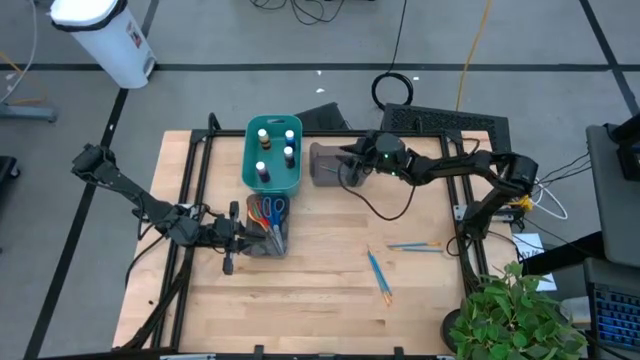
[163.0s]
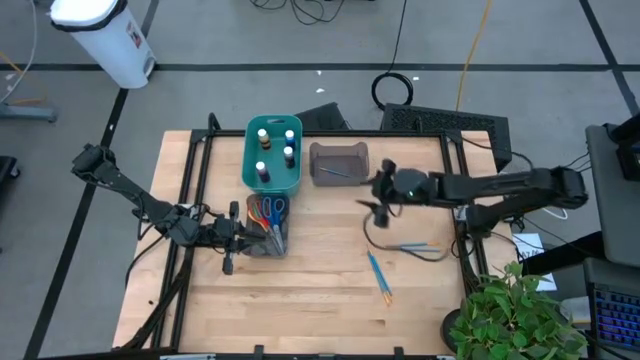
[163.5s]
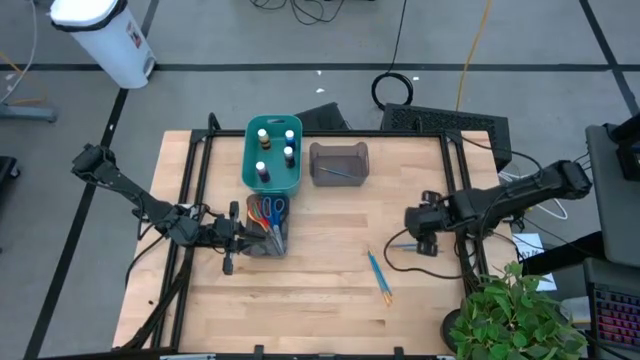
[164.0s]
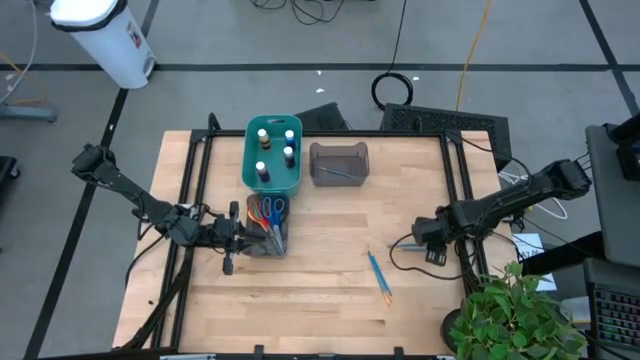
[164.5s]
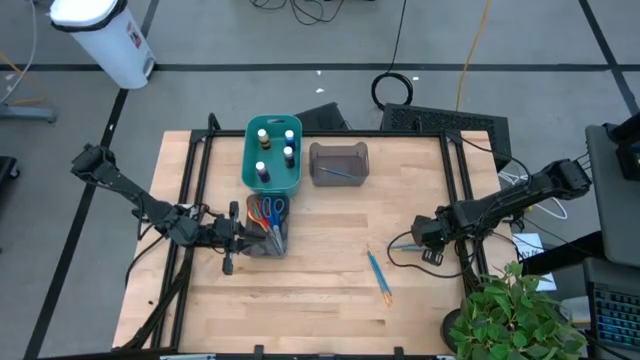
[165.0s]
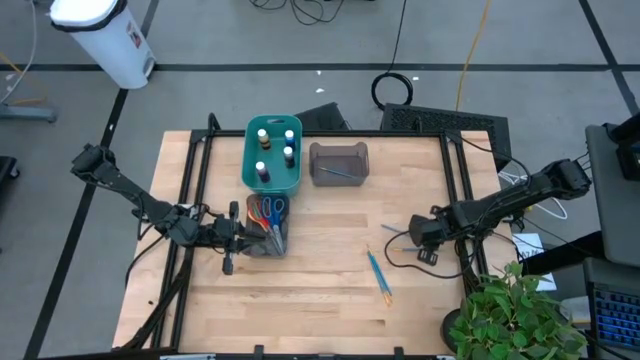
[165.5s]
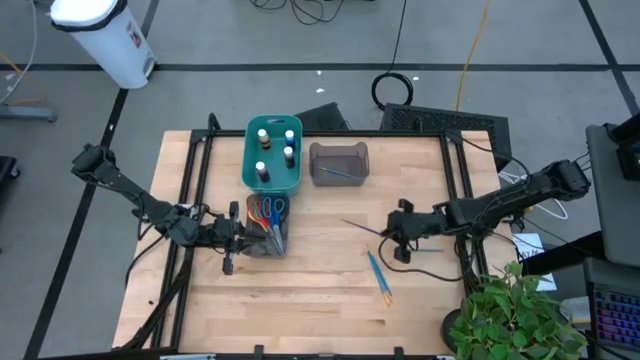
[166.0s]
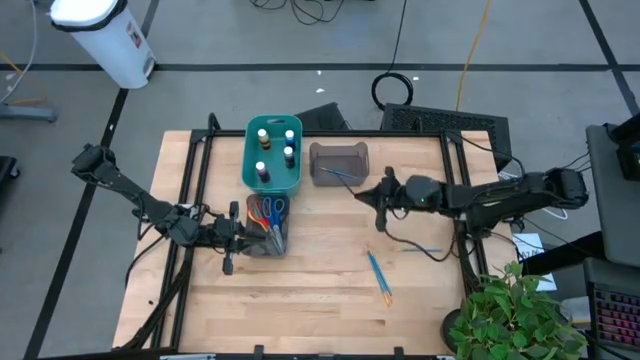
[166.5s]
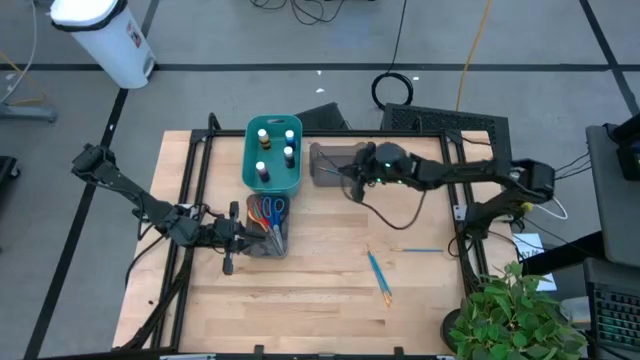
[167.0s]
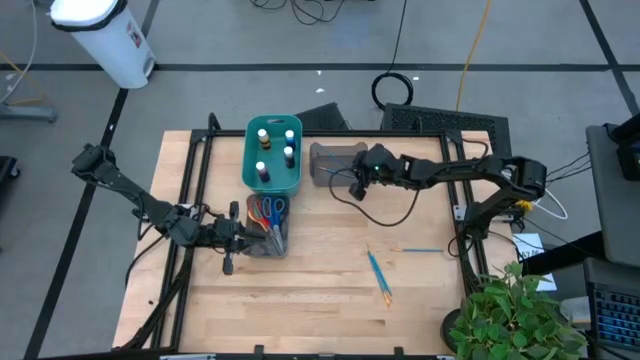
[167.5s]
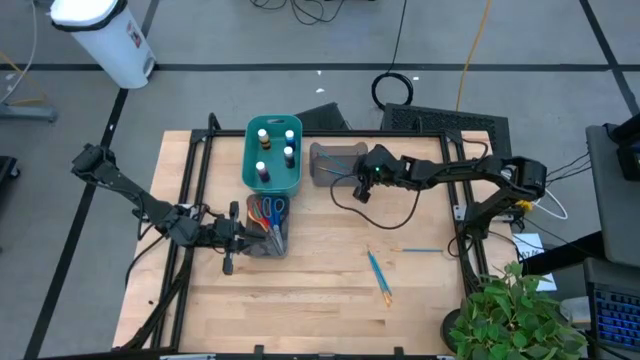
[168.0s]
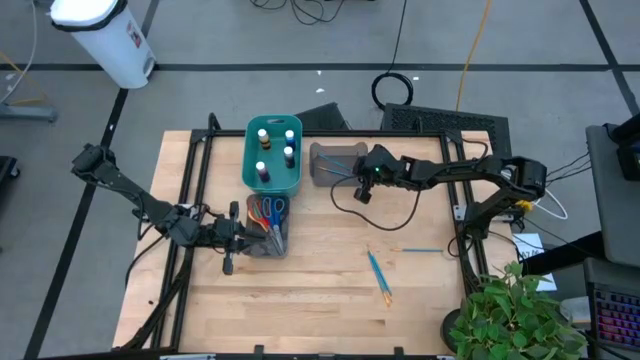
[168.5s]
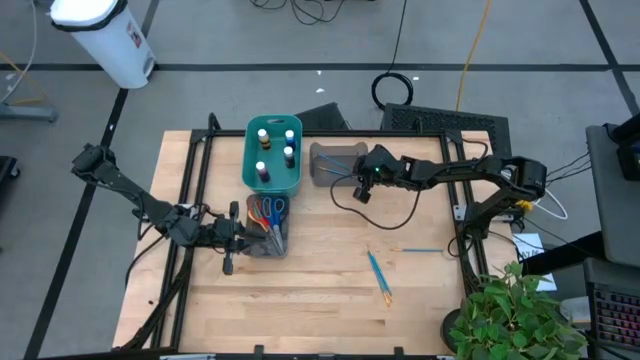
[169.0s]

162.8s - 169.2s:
Task: Pick & Place Paint Supplies
Put the blue paintbrush into the top black bin

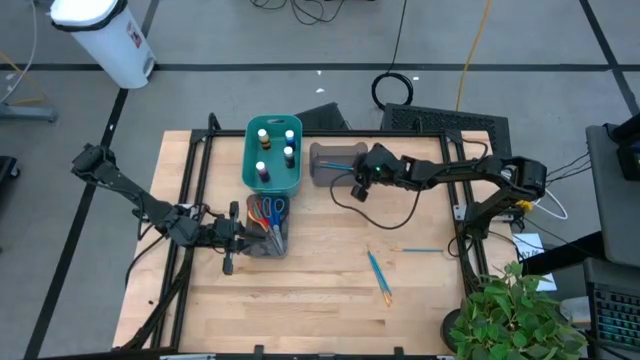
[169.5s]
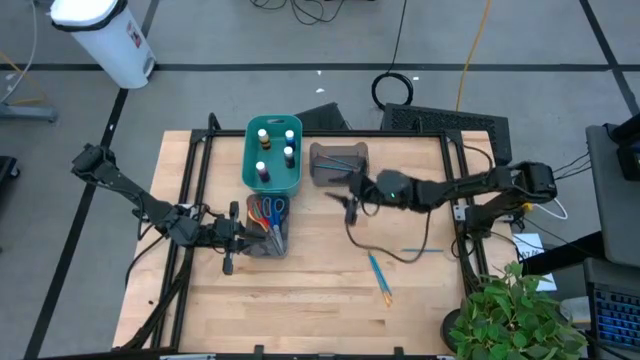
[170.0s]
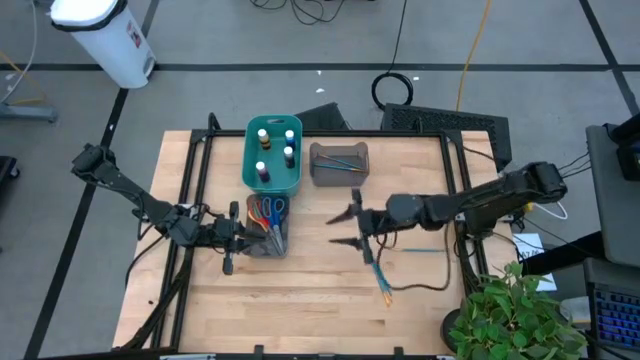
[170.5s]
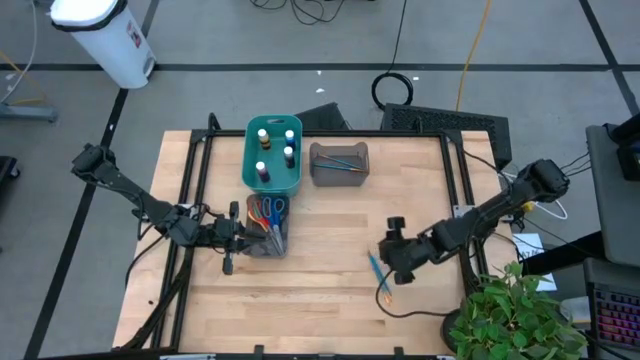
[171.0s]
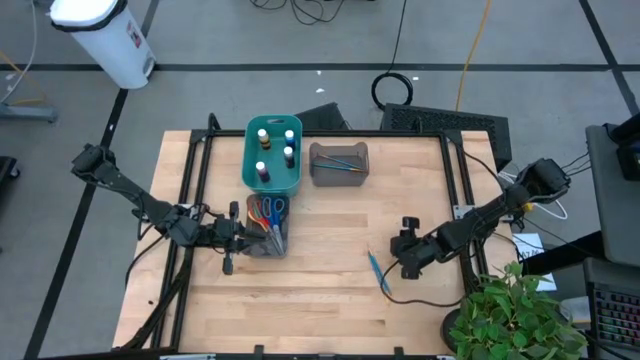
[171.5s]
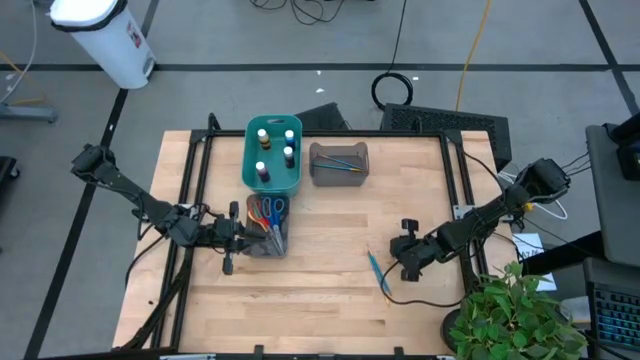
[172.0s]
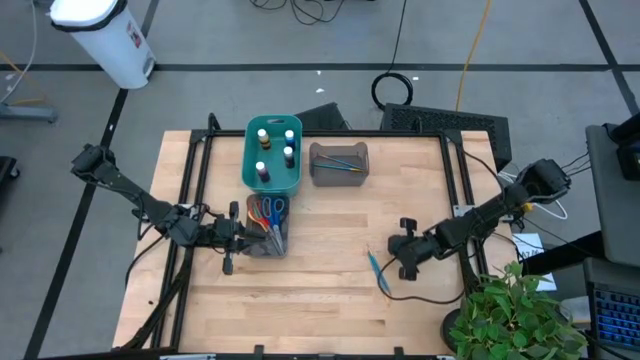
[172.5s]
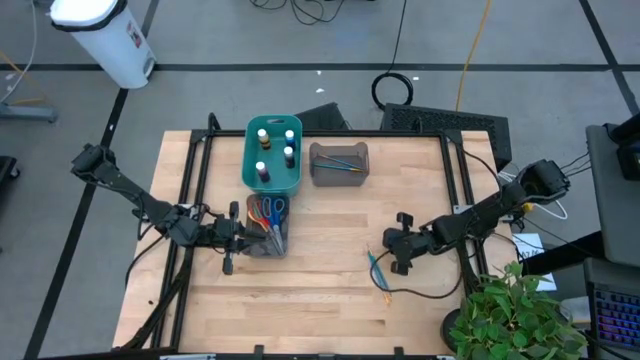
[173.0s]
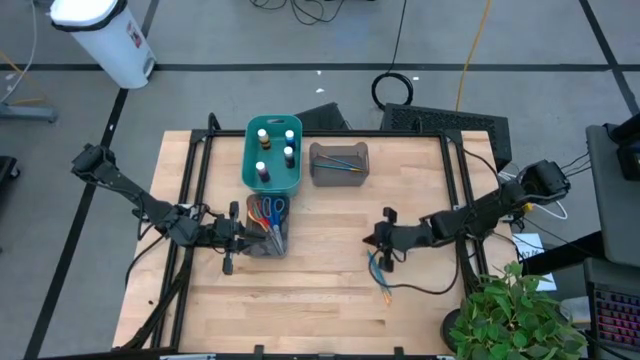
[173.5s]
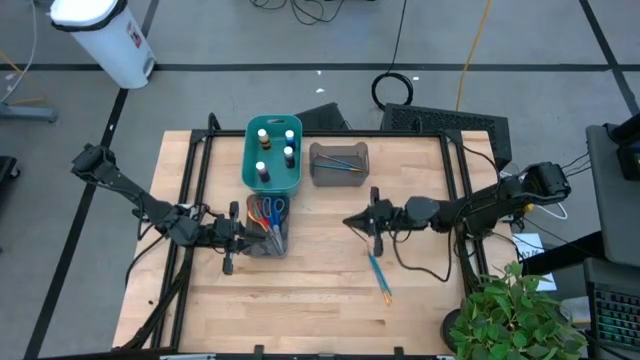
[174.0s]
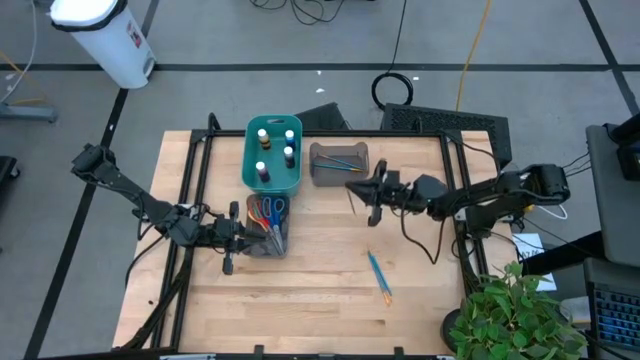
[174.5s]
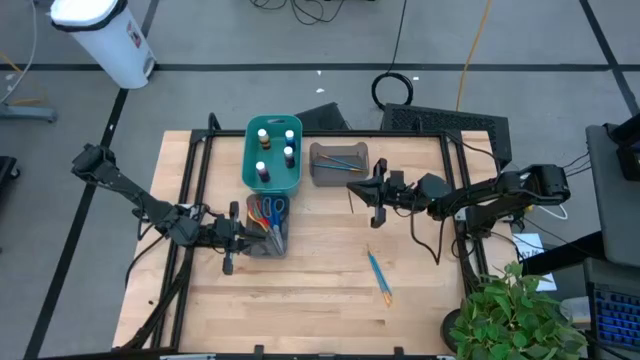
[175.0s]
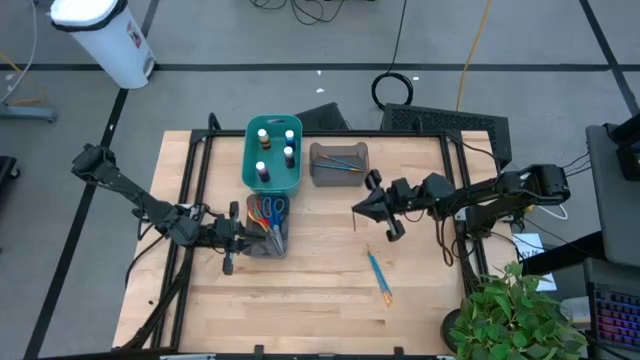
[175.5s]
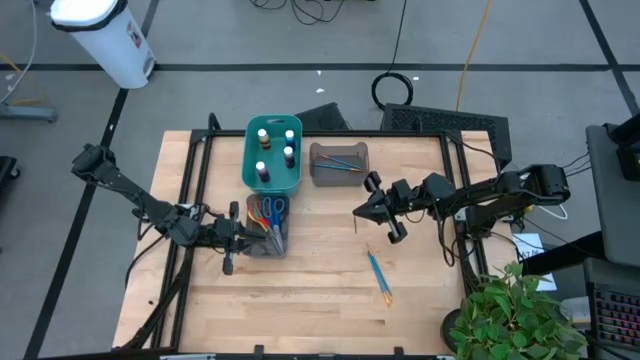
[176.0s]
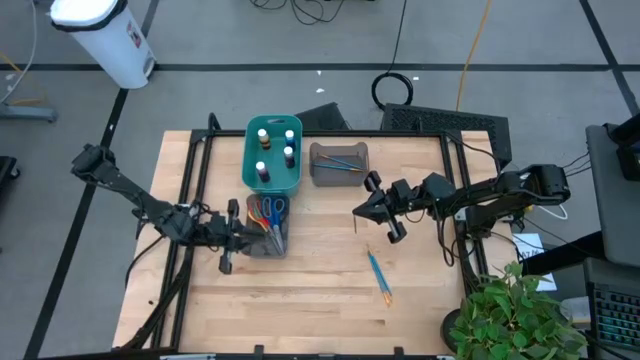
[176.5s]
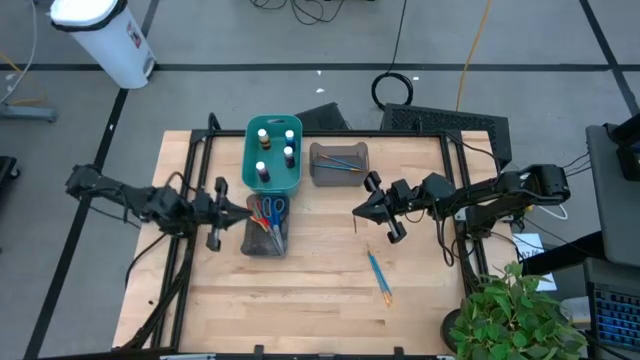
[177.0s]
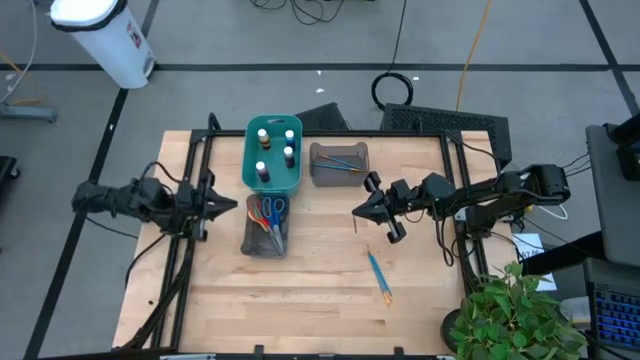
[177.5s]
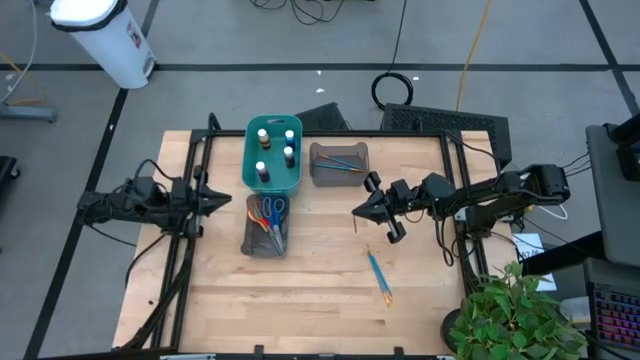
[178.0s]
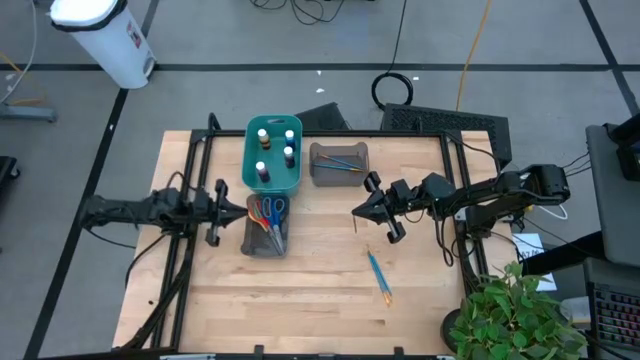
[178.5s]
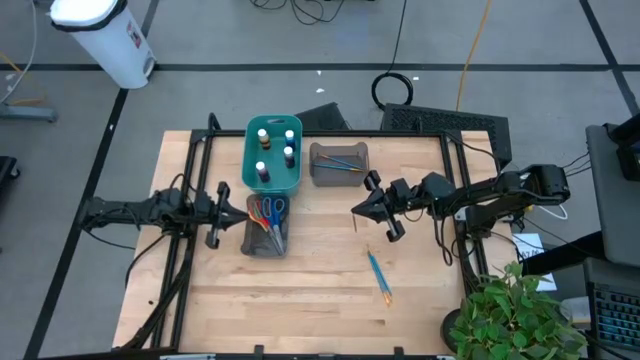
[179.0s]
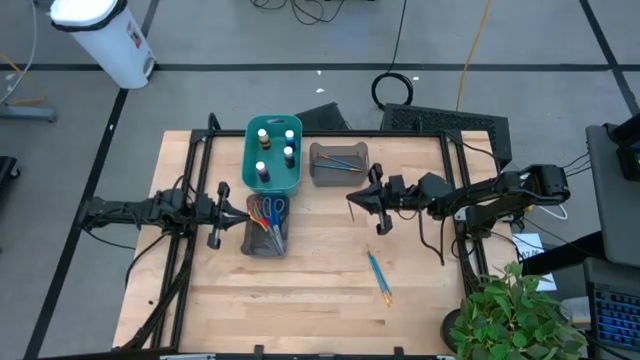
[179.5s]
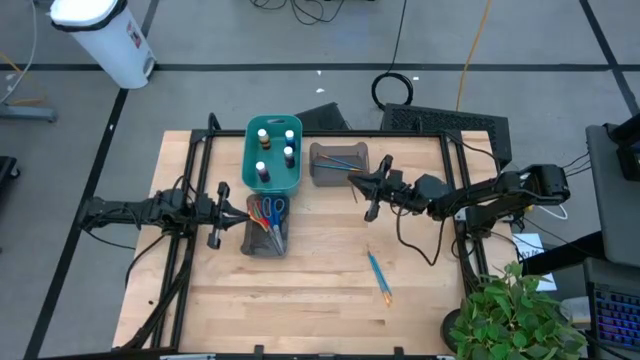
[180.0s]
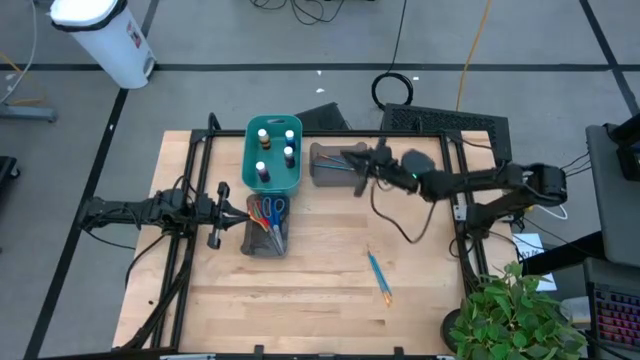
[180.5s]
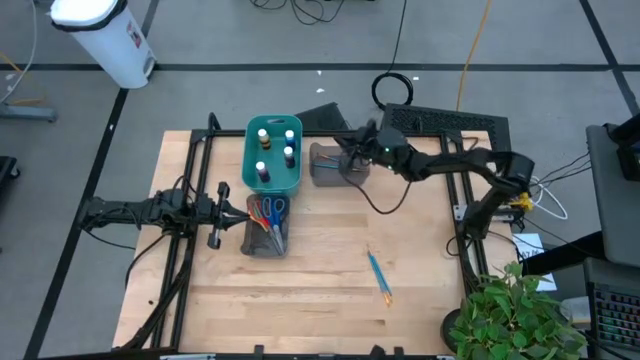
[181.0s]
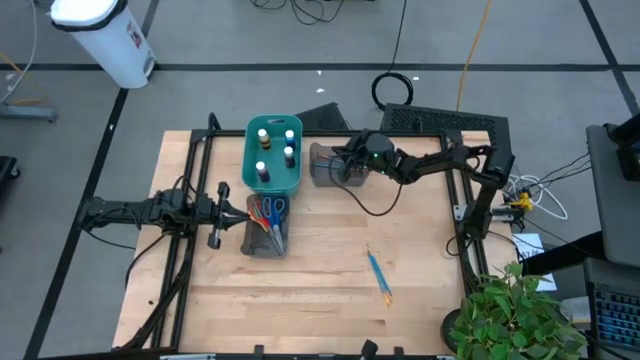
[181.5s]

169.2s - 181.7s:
Put the blue paintbrush into the top black bin
